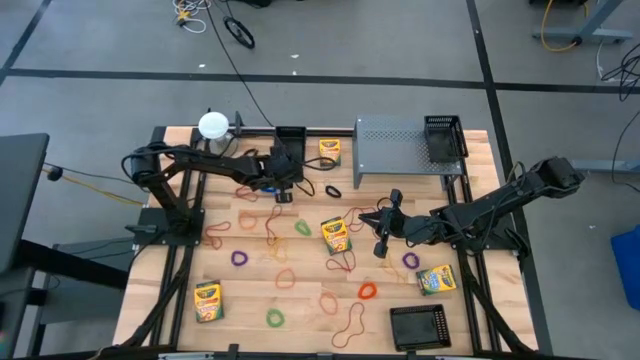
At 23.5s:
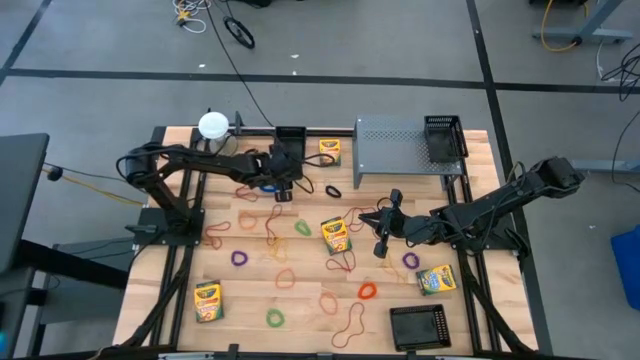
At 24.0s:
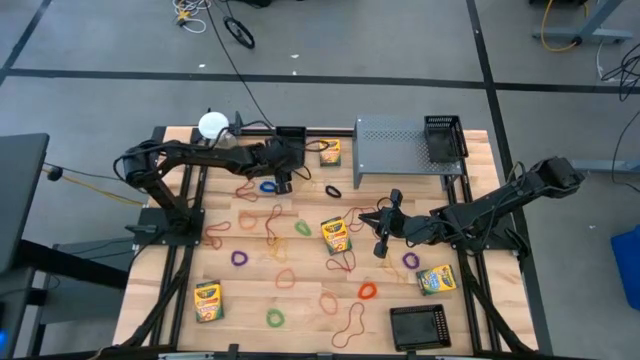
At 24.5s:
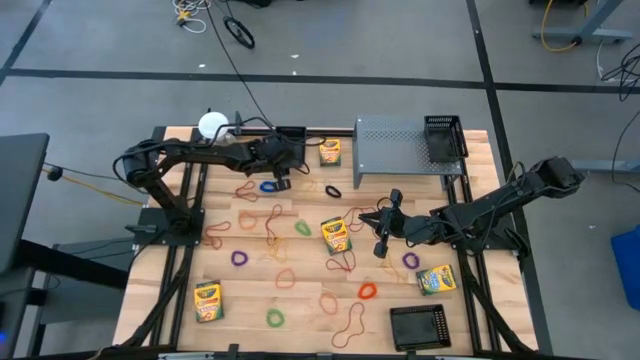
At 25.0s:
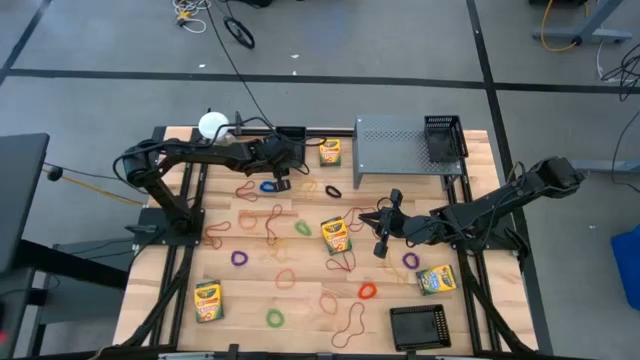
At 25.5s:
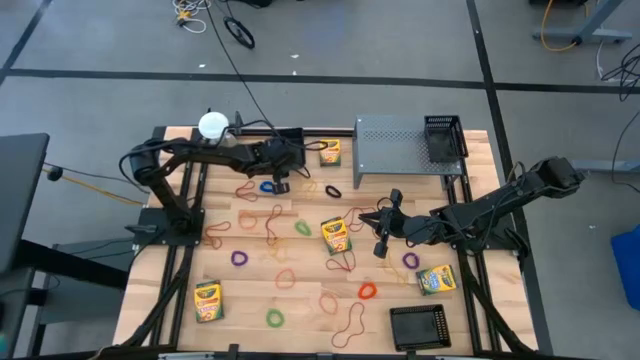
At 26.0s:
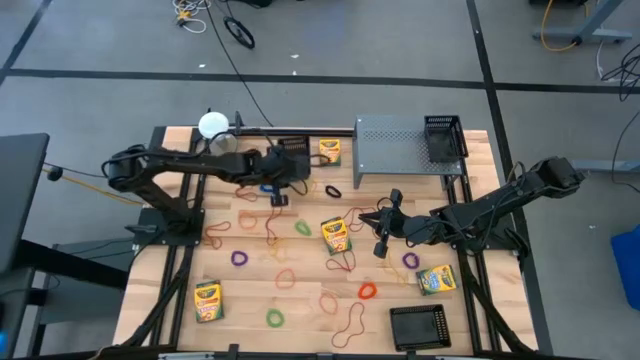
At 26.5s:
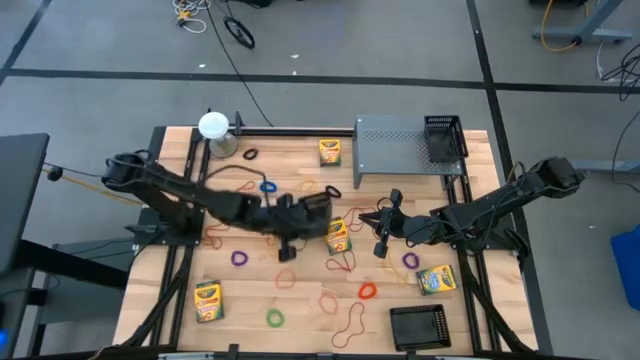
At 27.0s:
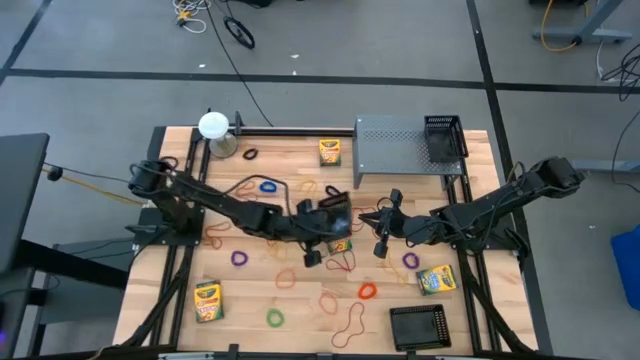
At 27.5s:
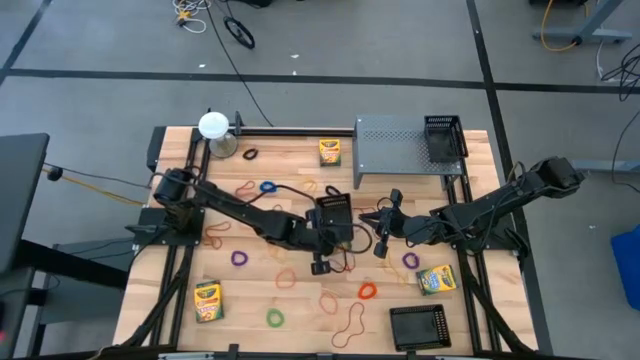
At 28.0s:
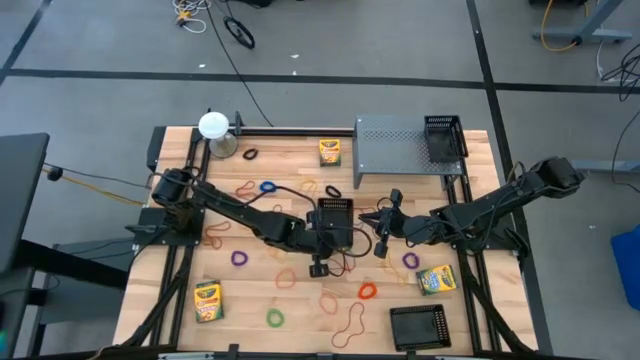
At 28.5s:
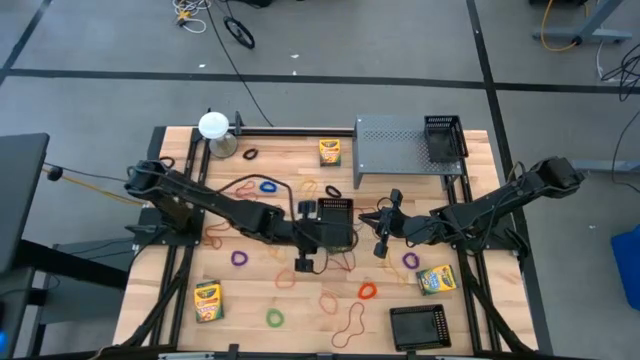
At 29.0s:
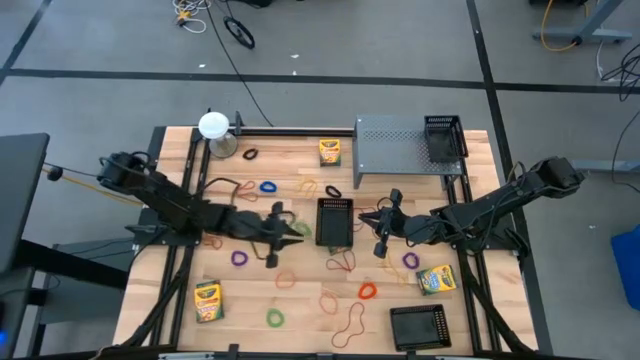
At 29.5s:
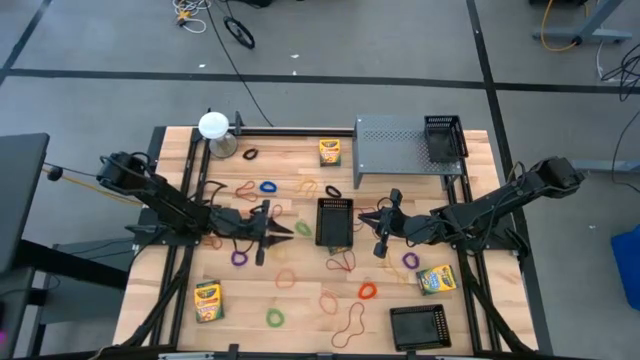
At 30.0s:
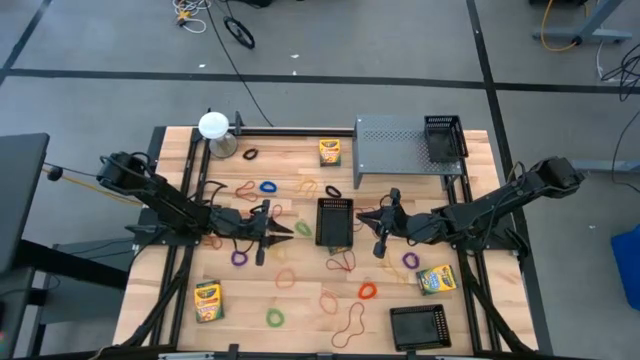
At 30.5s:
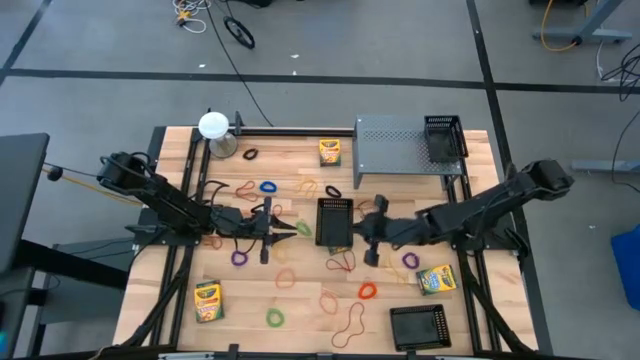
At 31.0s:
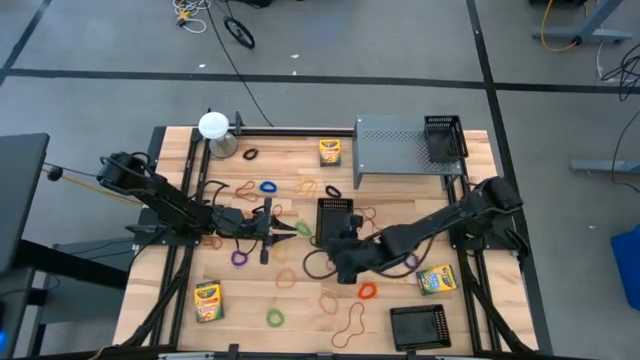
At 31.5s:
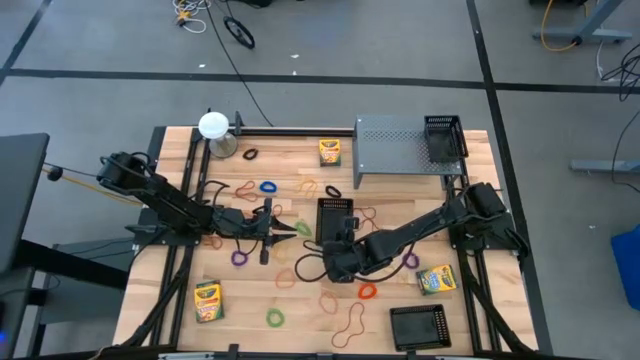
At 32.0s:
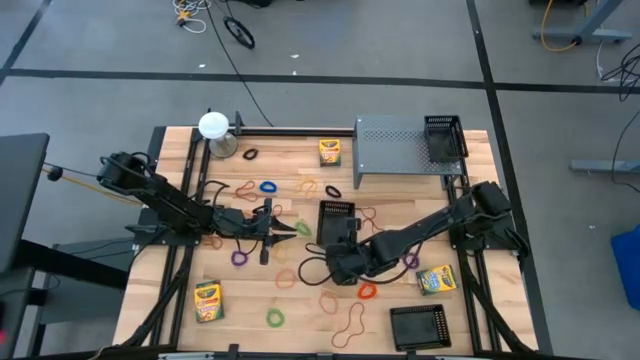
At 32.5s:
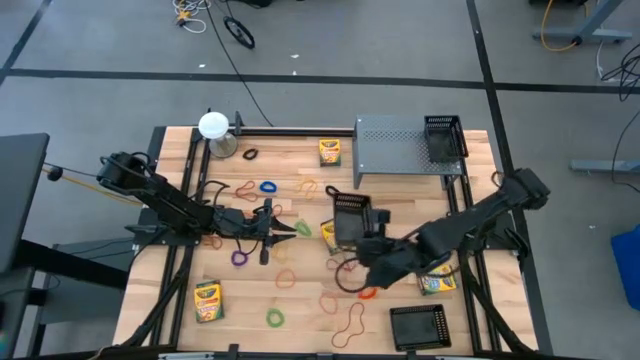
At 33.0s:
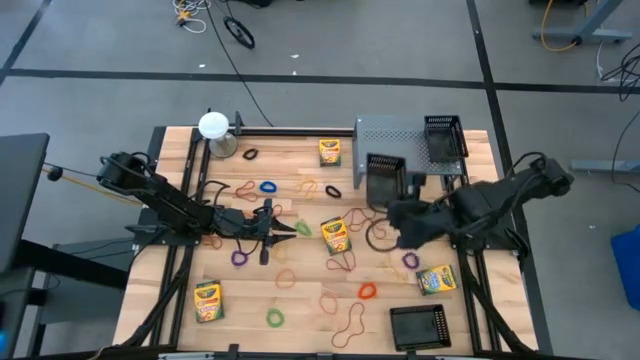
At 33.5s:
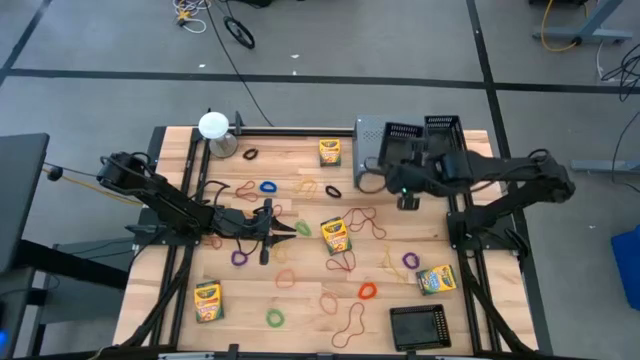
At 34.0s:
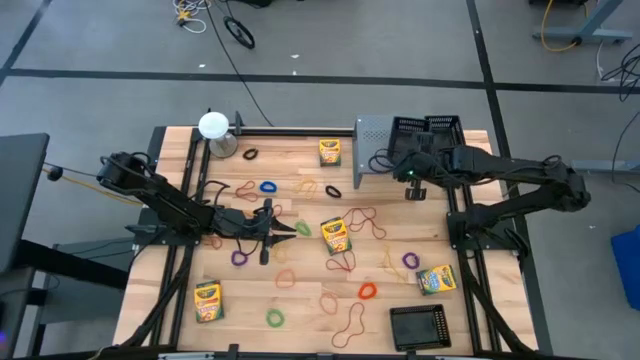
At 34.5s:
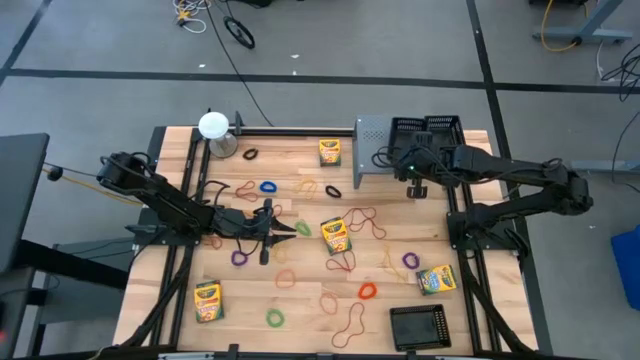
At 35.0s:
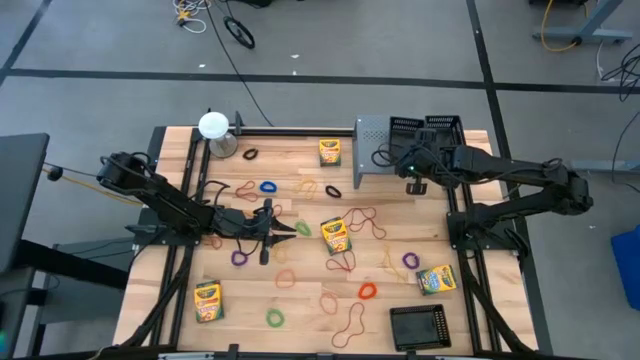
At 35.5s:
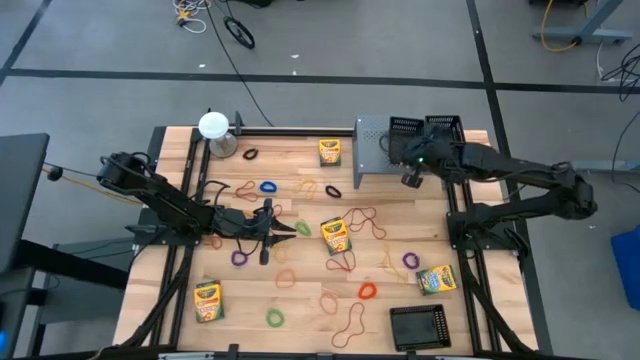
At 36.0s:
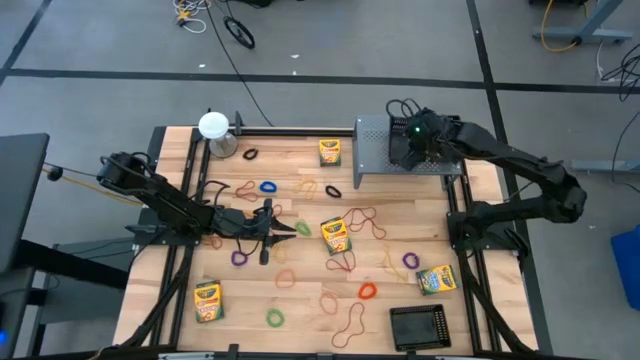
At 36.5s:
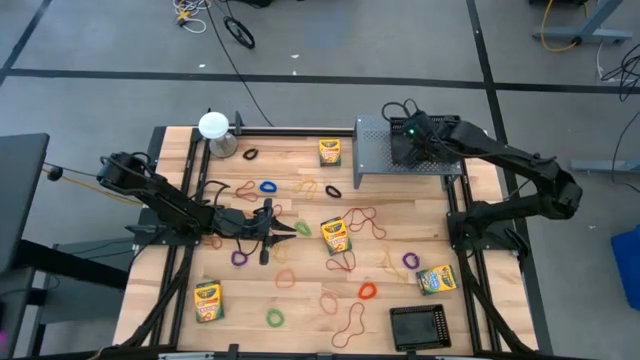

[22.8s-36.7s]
Task: Pick & Place Office Desk Supplies
Put the top black bin on the shelf

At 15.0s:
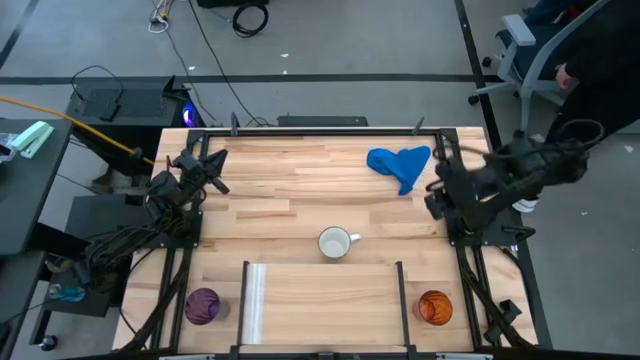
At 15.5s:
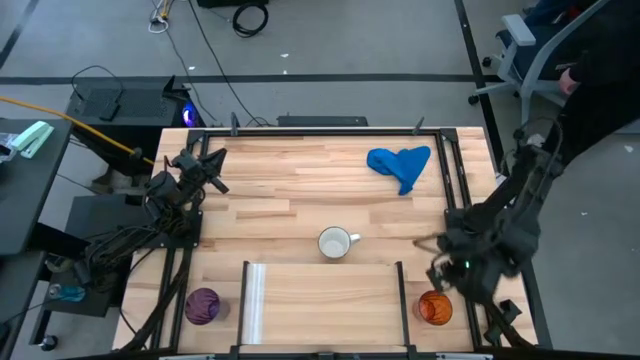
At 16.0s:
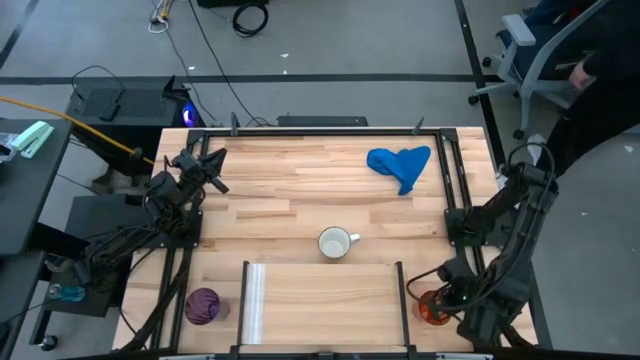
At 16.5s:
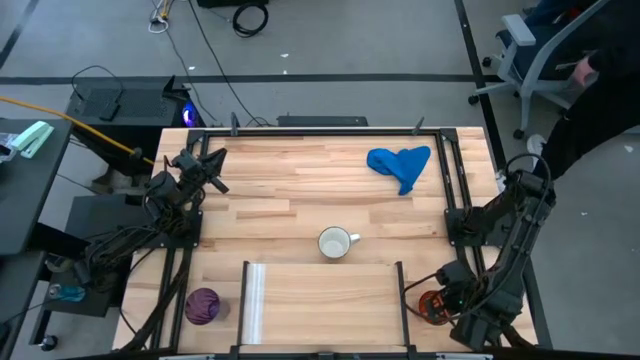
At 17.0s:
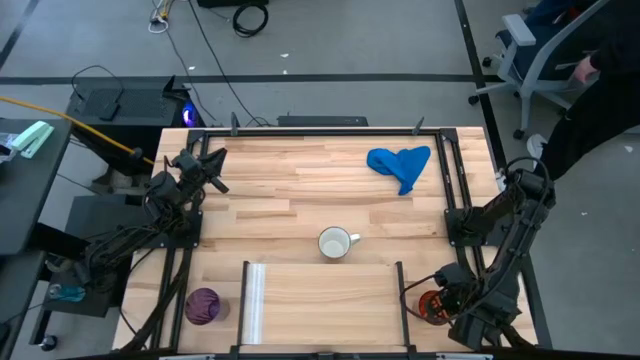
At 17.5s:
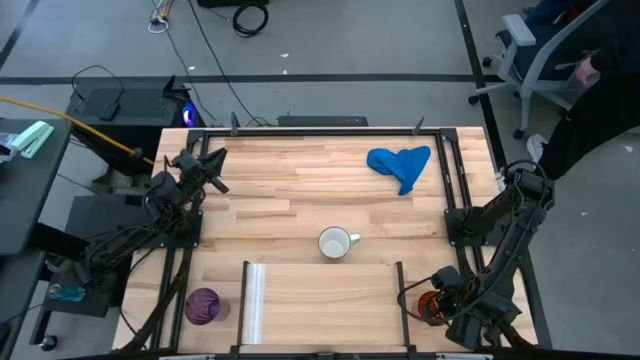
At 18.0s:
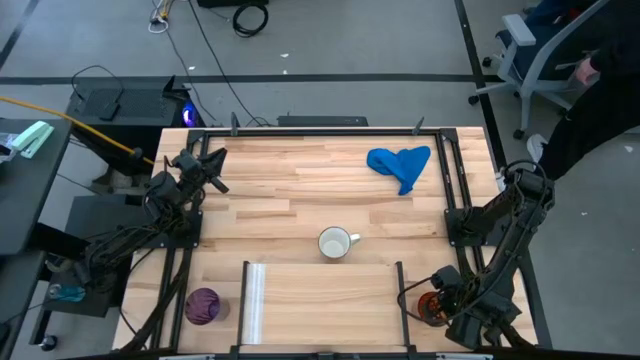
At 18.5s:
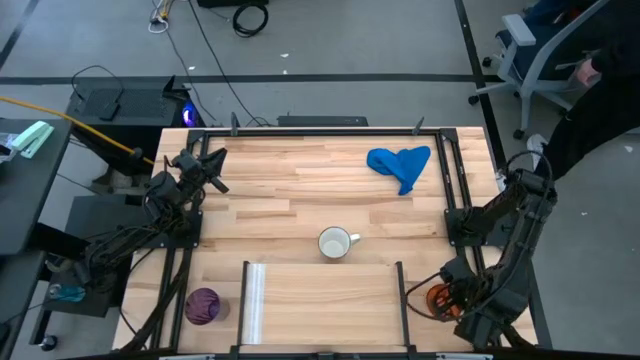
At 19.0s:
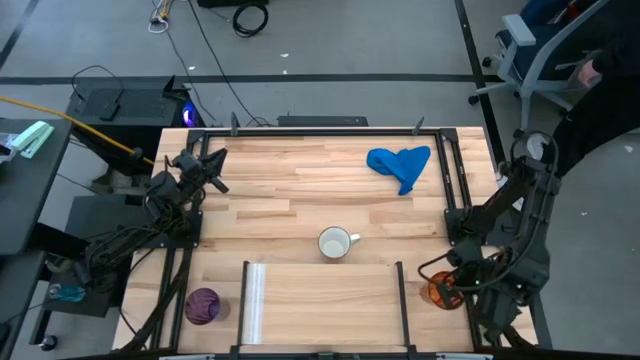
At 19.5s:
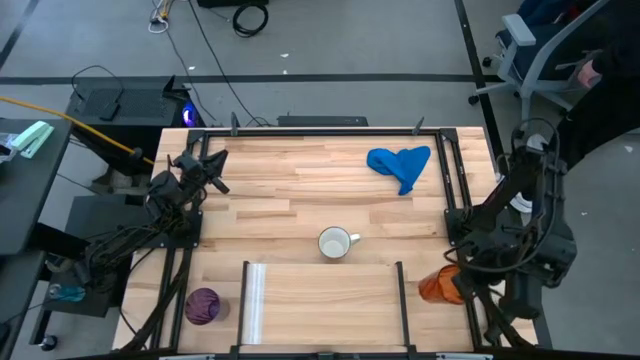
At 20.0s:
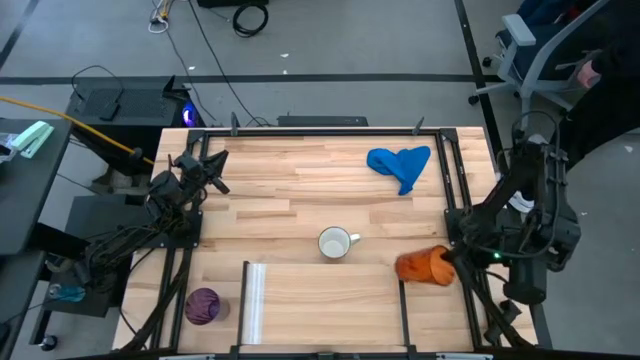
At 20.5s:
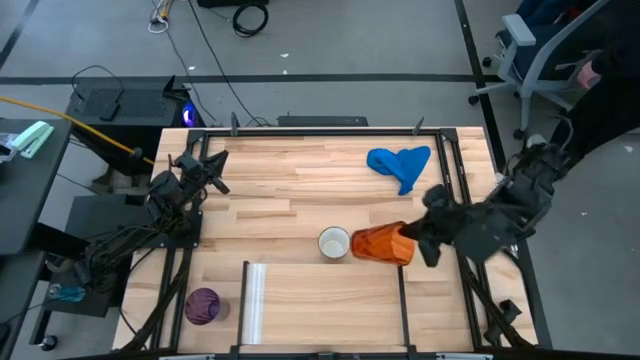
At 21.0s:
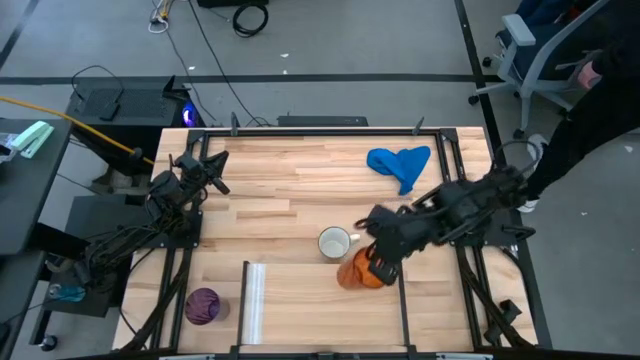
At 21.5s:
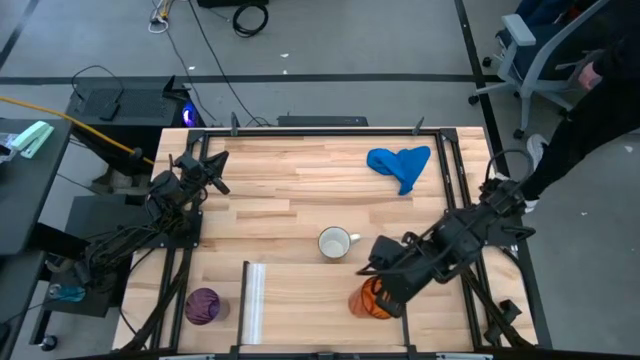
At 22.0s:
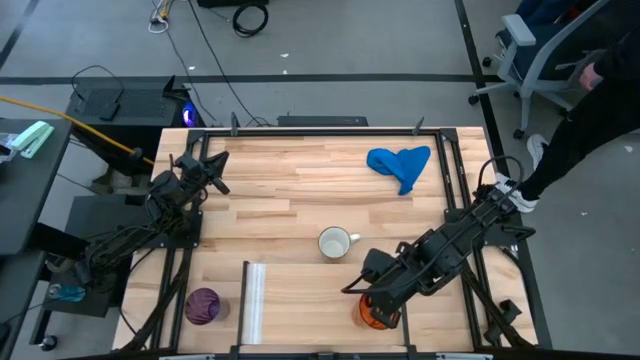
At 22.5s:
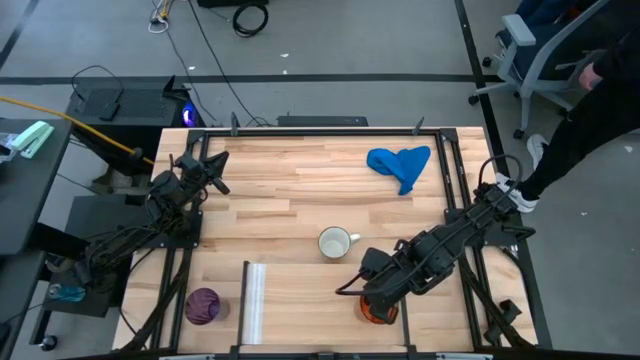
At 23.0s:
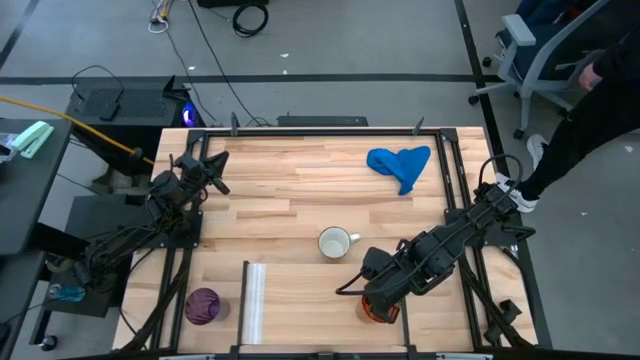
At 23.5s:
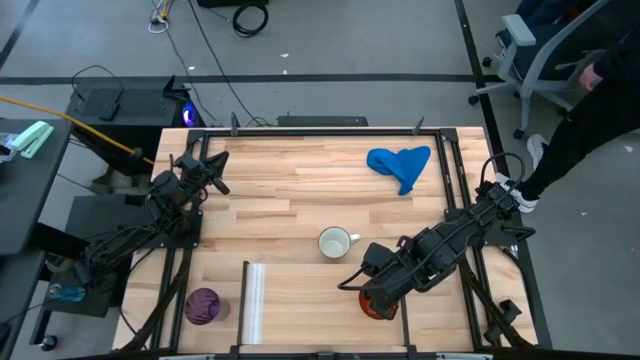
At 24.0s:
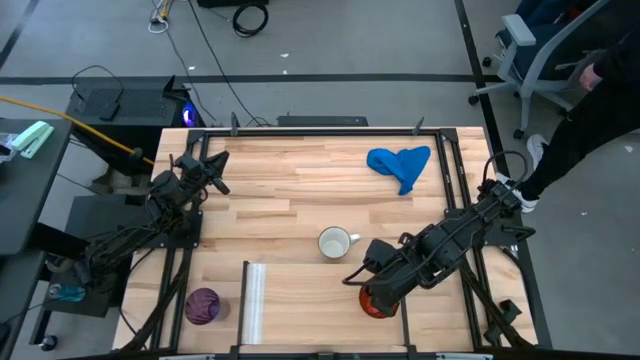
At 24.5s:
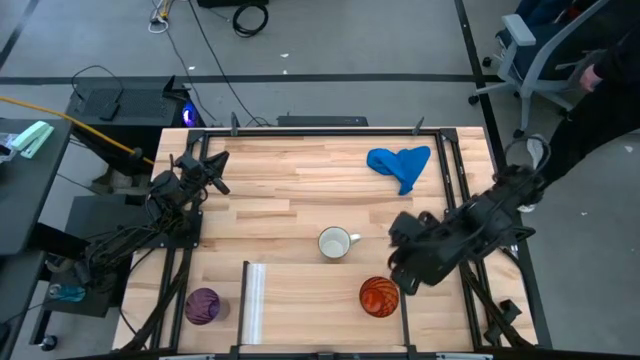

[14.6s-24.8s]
Task: Stack small to large cups/mugs on shelf
Put the orange cup on the shelf
